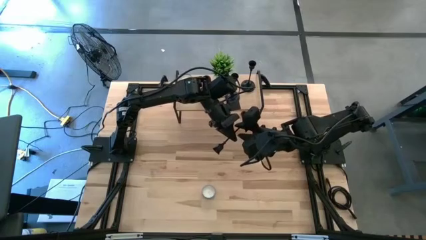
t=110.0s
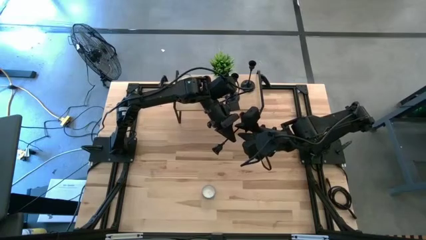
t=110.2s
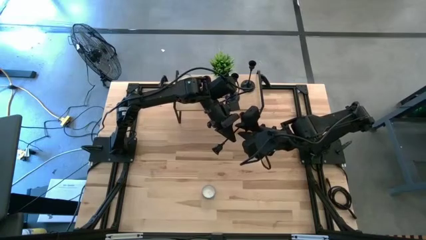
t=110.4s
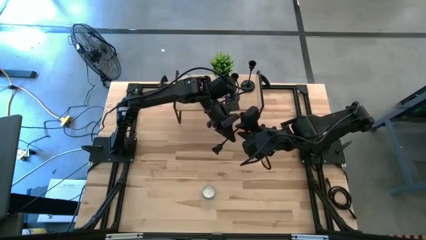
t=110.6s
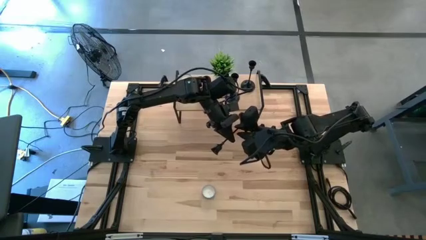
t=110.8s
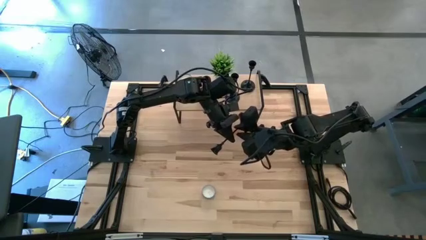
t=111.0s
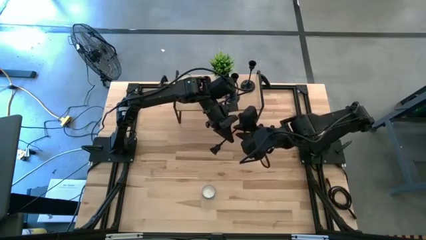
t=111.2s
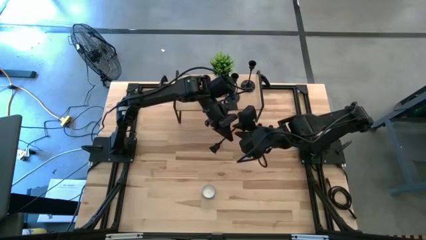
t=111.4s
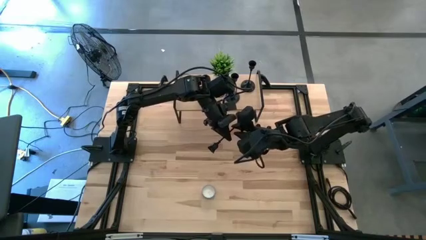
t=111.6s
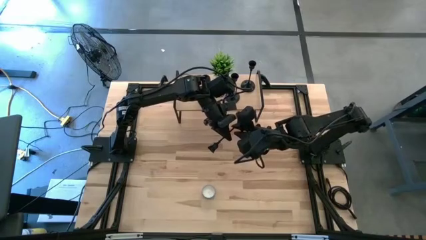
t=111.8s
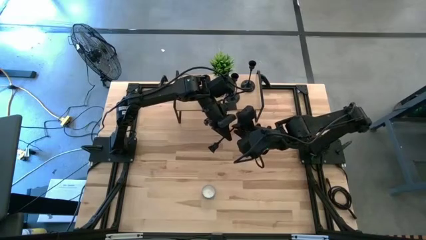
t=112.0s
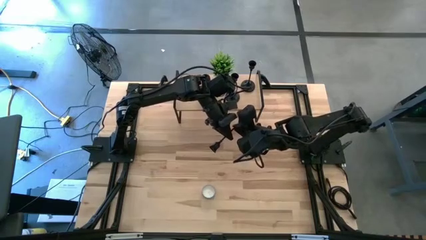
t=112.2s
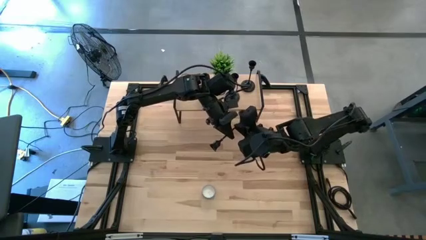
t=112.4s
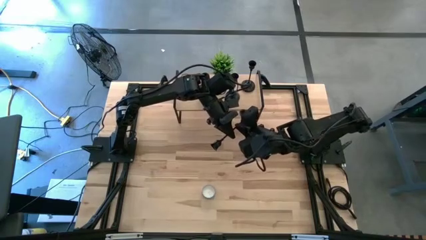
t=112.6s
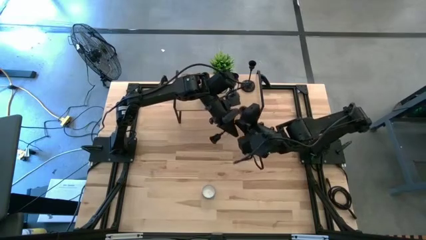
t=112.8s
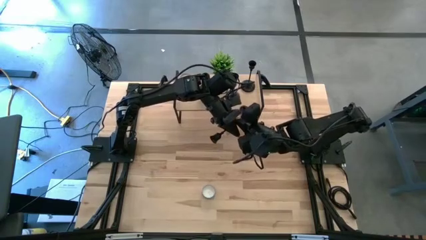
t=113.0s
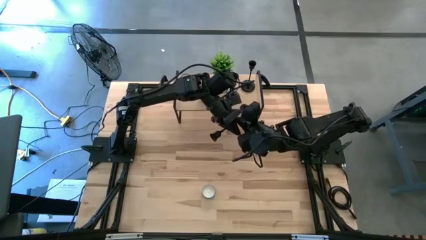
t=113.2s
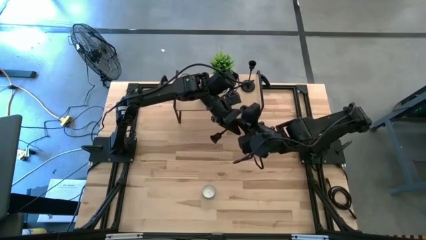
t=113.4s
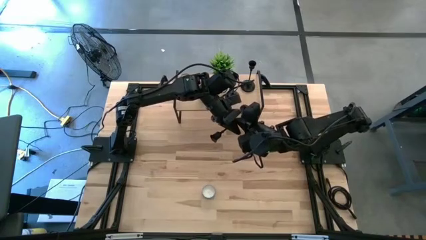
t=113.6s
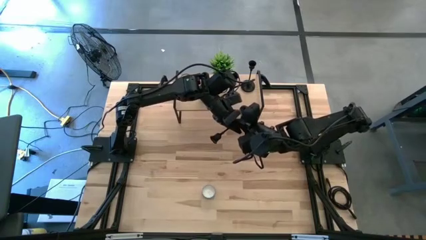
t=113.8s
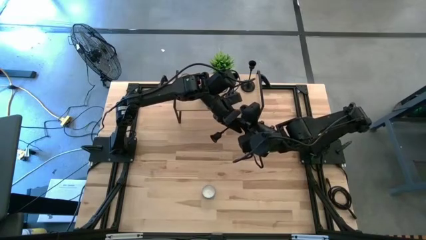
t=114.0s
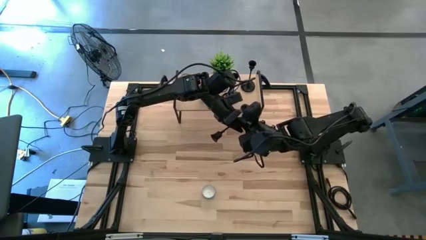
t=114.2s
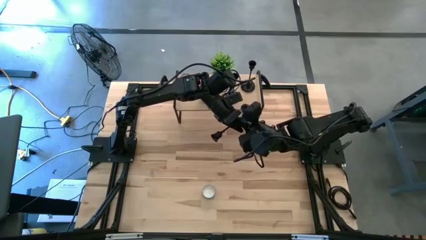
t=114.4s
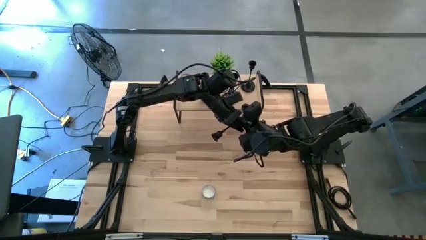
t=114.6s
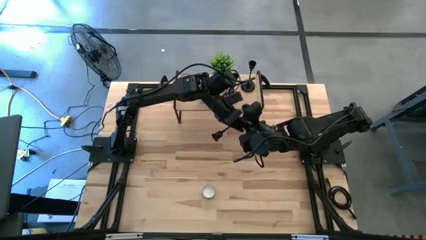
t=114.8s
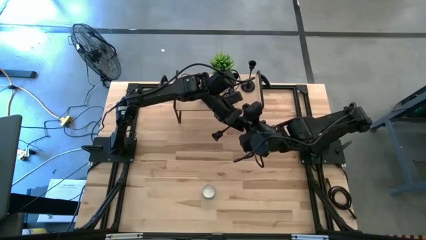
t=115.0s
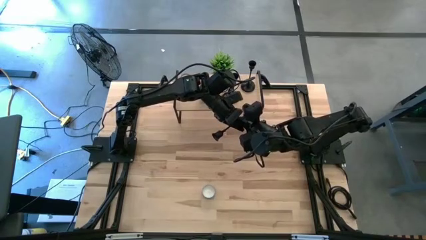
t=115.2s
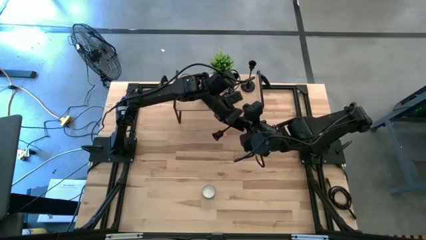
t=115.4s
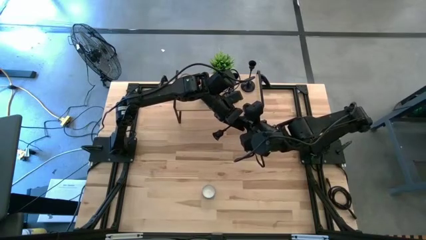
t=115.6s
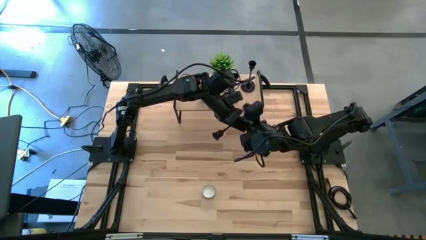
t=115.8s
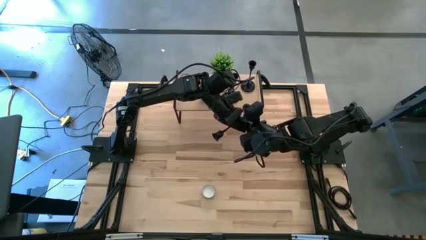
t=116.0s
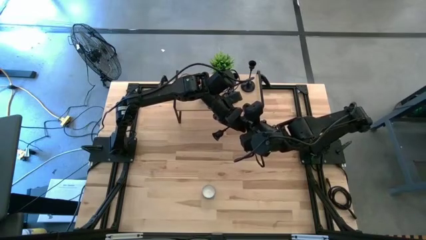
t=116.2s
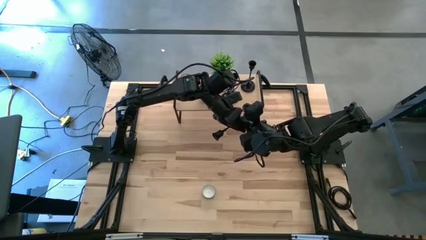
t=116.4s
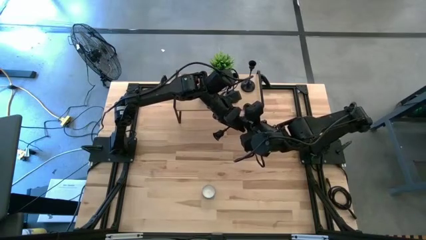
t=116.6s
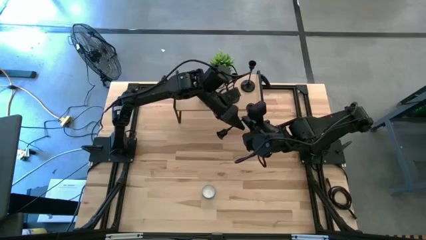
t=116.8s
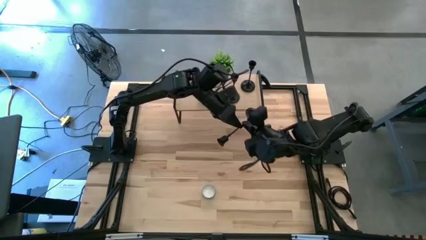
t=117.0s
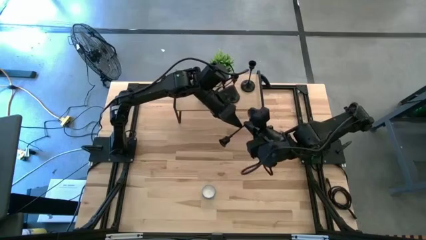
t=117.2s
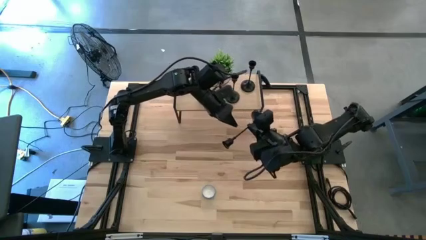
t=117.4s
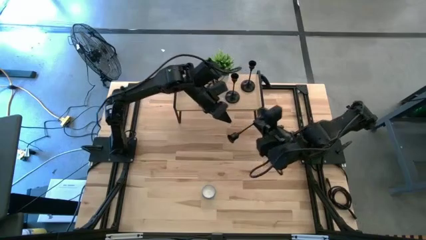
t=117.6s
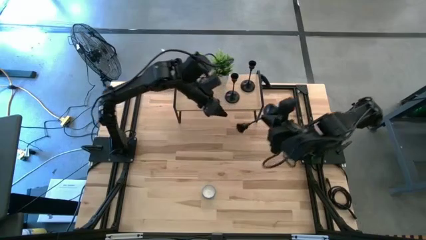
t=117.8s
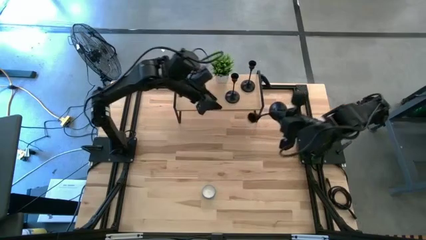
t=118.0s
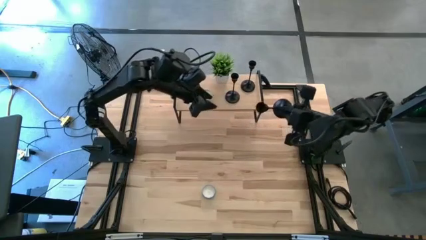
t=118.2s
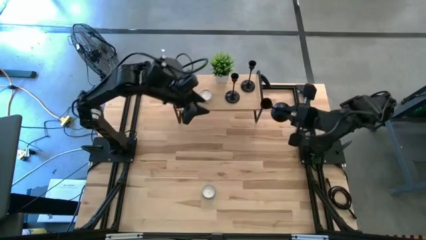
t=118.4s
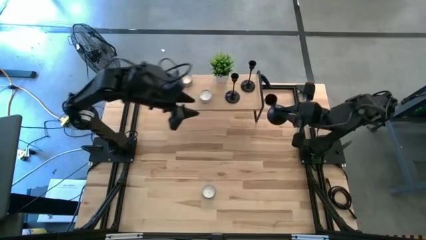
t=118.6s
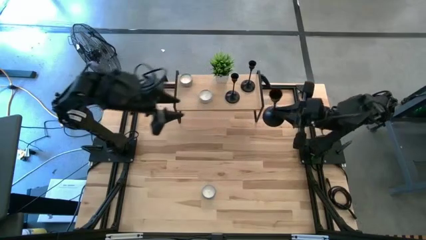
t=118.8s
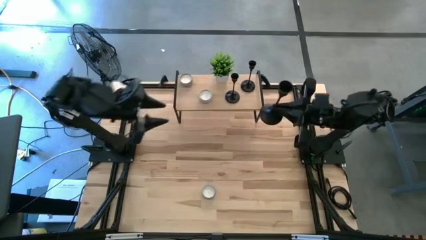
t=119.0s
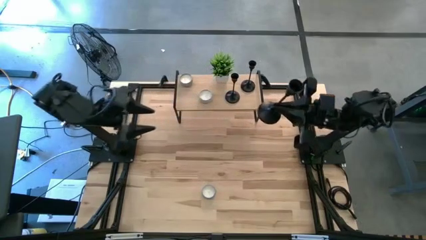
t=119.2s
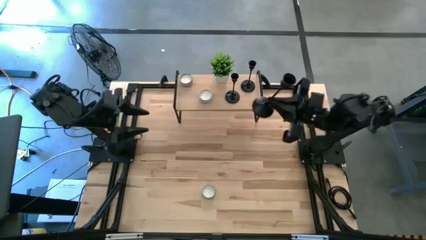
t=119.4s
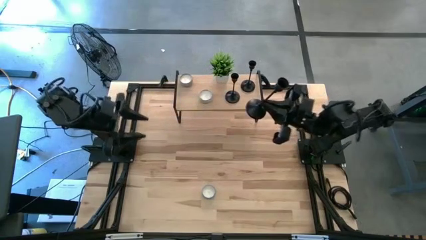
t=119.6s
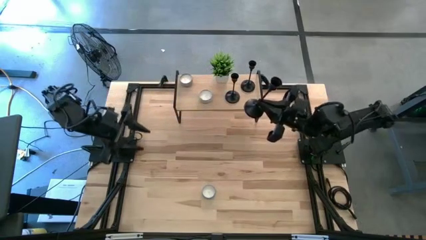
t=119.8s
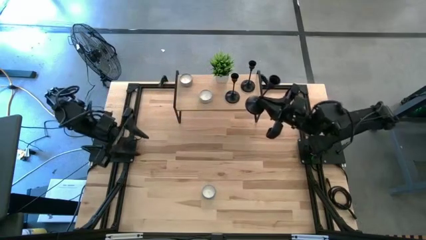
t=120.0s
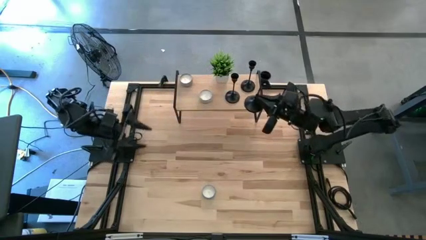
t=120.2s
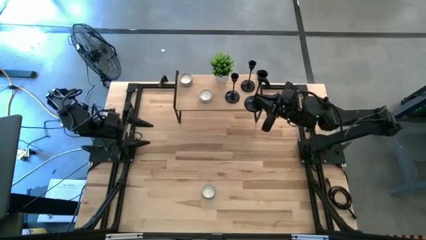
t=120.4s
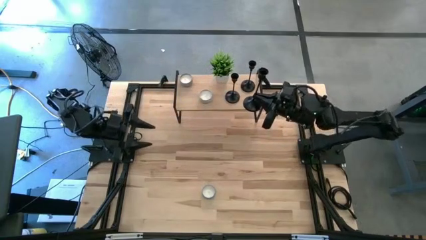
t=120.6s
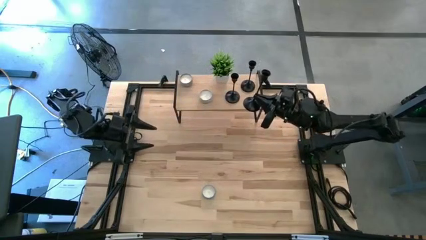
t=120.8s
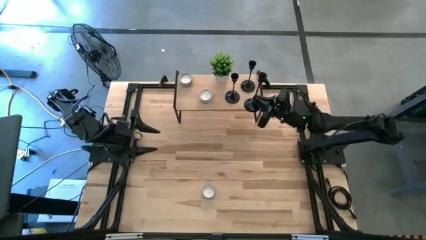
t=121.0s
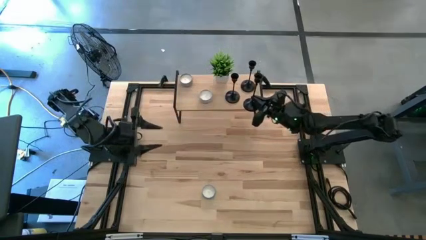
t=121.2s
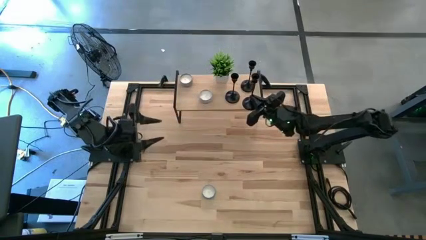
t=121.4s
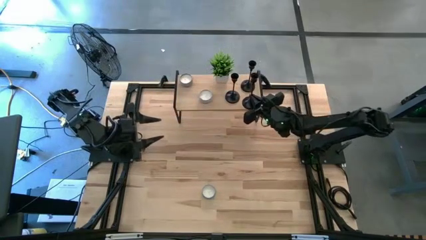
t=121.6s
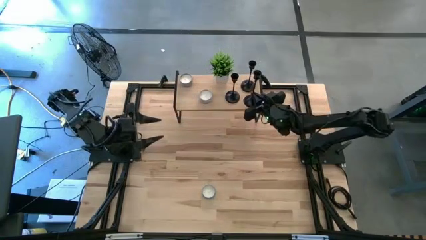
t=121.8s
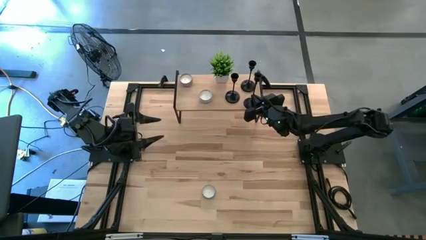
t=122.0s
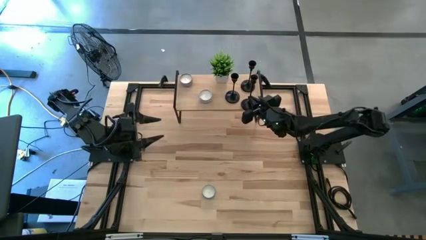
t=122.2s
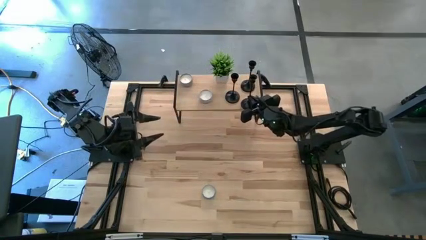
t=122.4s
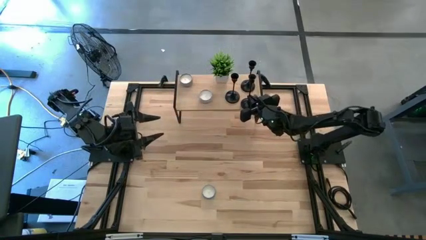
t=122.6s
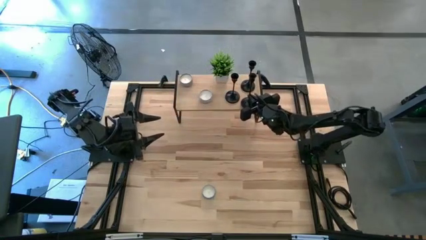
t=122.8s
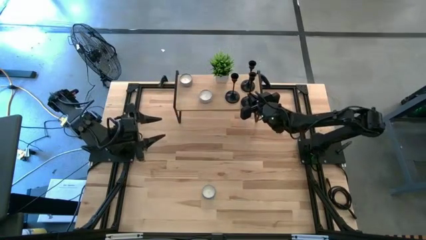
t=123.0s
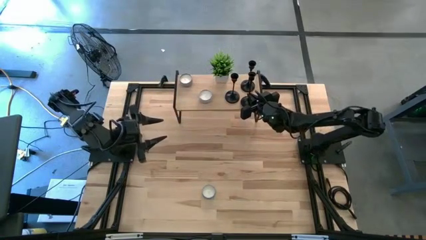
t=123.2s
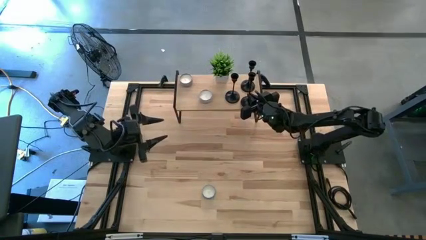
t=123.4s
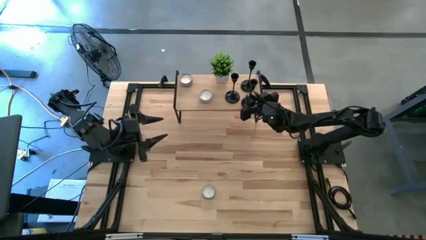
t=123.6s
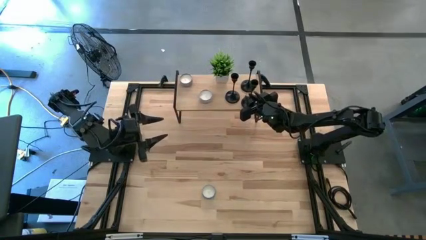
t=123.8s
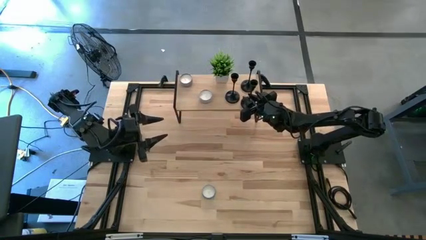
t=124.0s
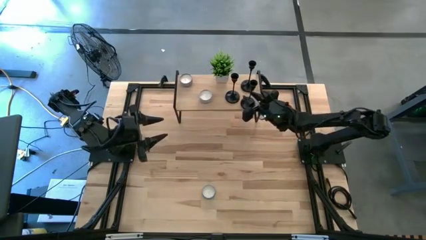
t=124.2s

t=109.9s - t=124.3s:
Task: Pick & Place candle stick holders
Put the black left candle holder on the shelf

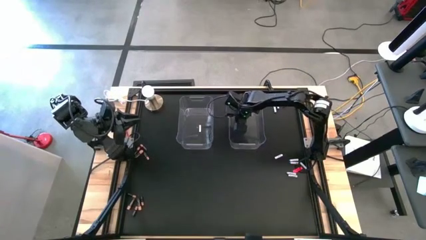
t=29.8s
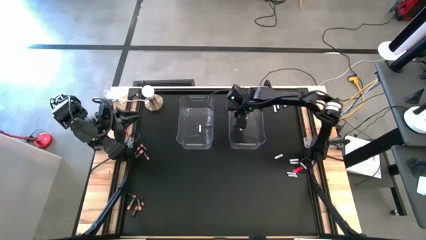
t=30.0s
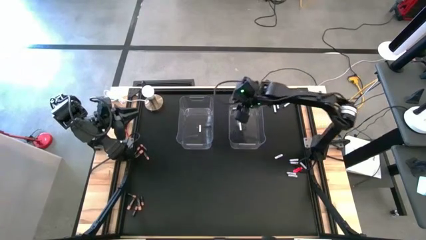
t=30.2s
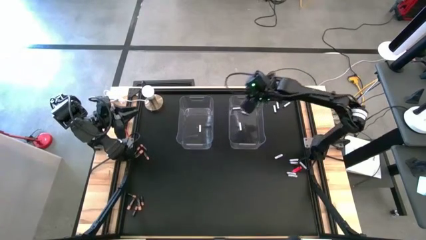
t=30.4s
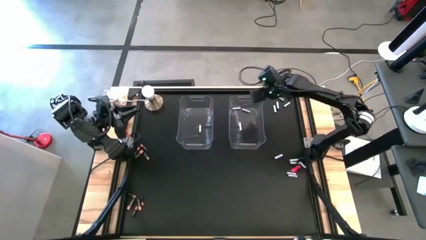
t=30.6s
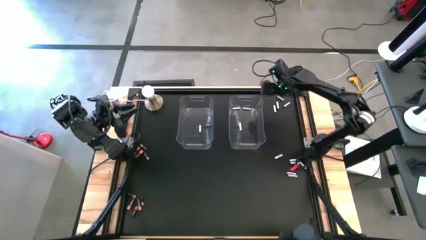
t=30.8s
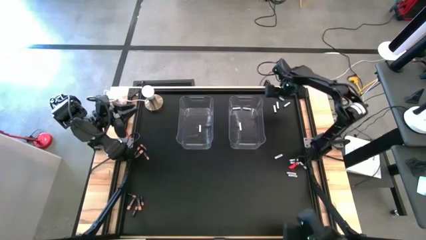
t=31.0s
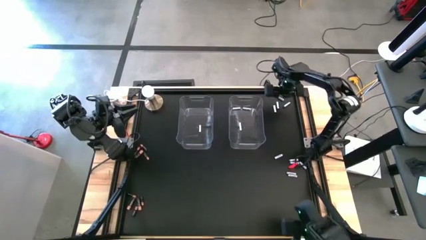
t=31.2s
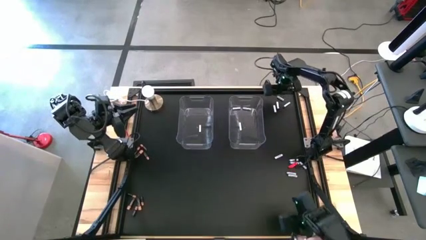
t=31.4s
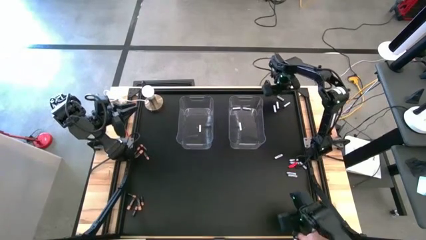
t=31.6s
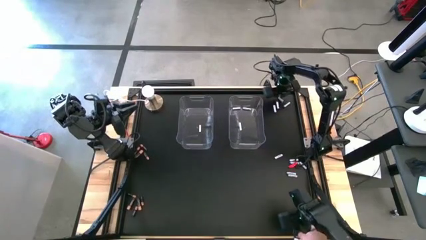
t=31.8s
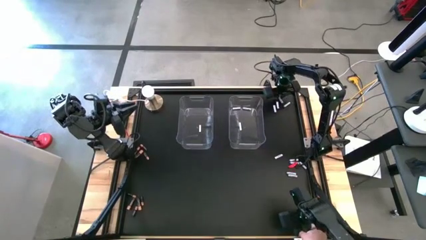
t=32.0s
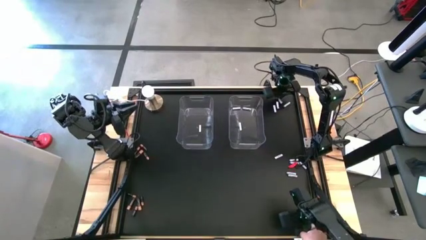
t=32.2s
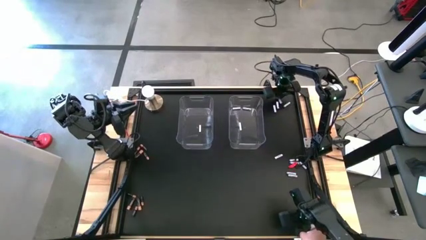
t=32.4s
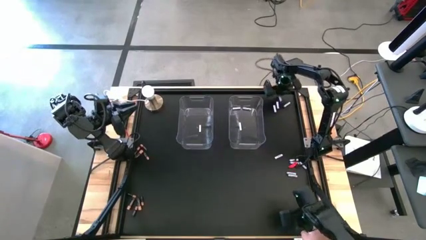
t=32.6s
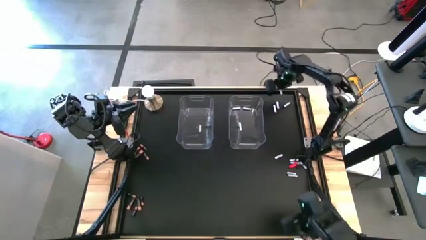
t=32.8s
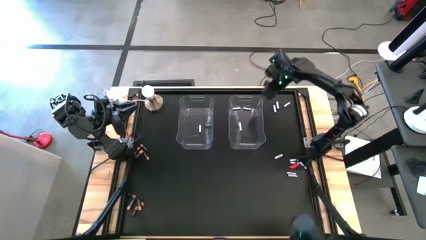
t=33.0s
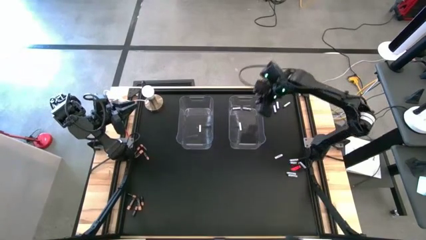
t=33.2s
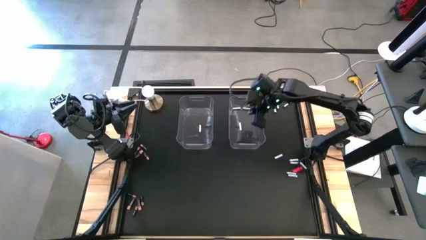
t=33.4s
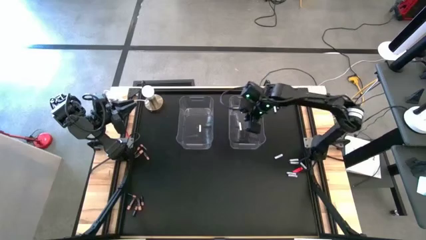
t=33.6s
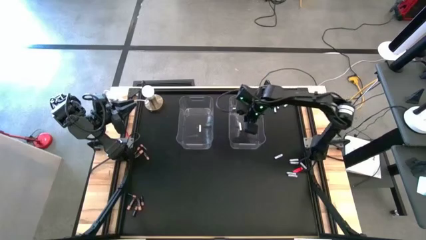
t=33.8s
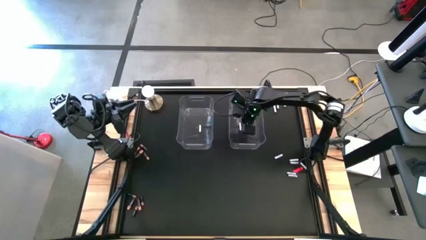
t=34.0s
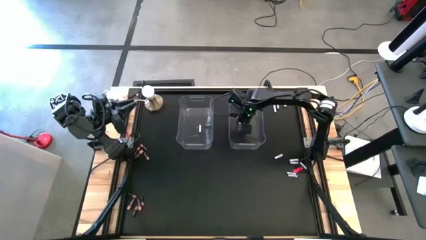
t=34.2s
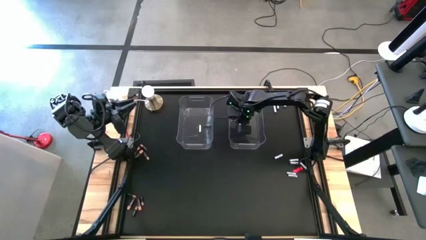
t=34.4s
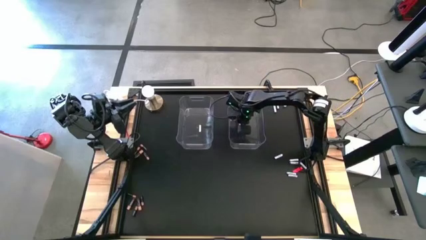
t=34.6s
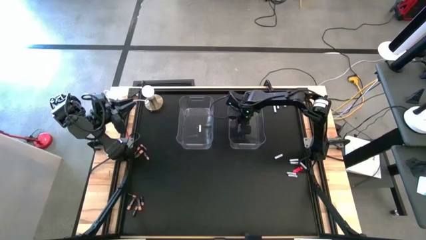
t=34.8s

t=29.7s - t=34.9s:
Task: Sort batteries
Put the white battery into the right transparent bin
